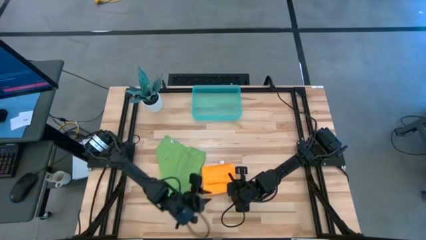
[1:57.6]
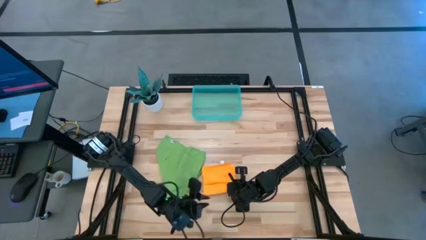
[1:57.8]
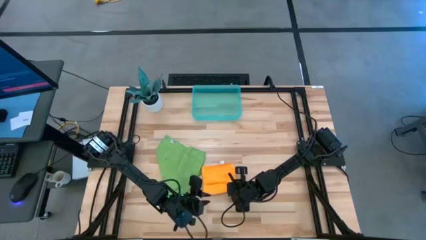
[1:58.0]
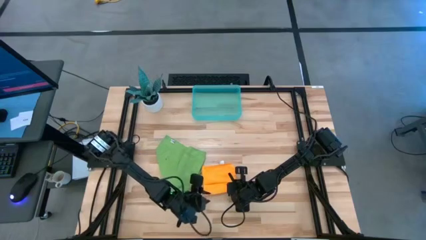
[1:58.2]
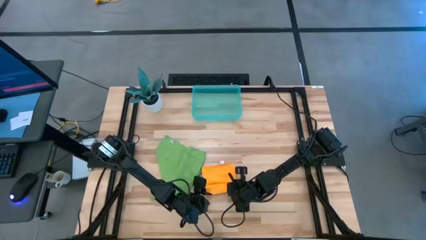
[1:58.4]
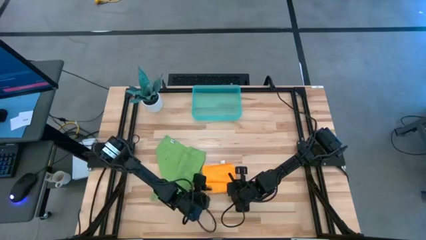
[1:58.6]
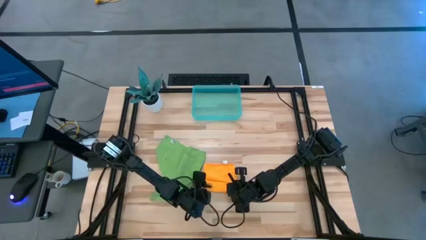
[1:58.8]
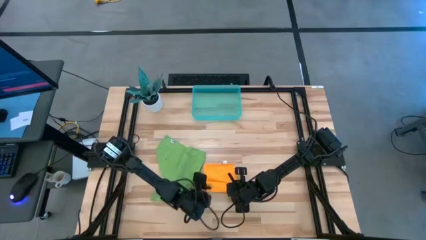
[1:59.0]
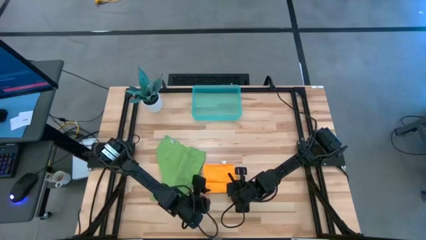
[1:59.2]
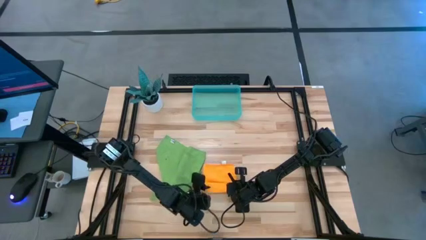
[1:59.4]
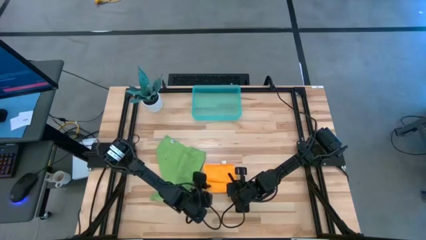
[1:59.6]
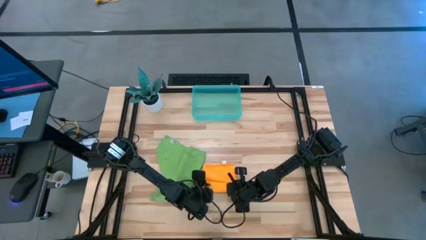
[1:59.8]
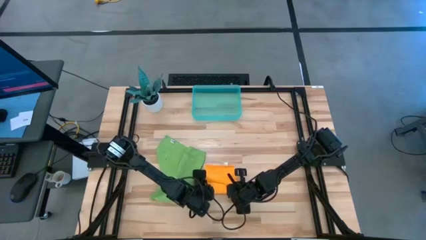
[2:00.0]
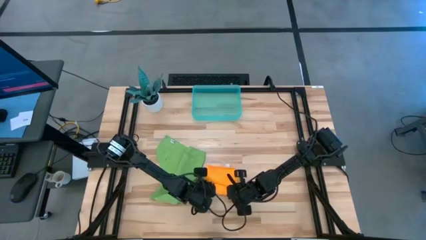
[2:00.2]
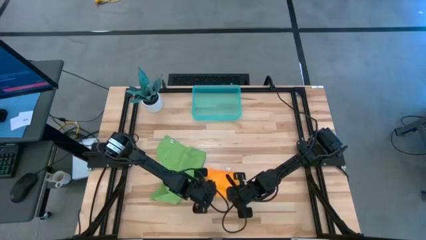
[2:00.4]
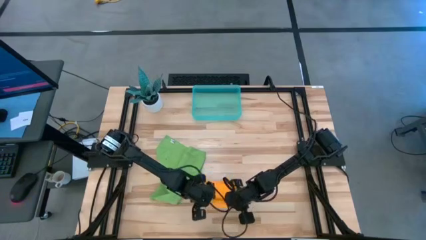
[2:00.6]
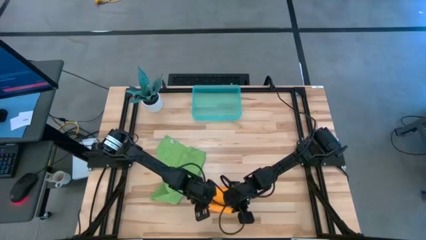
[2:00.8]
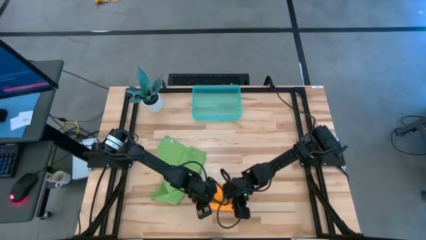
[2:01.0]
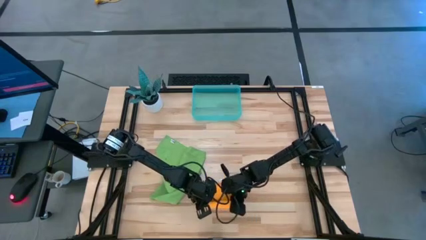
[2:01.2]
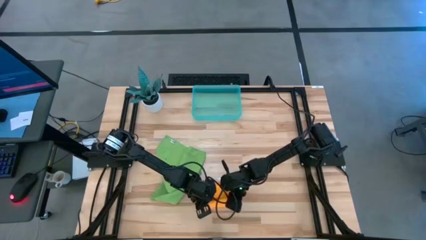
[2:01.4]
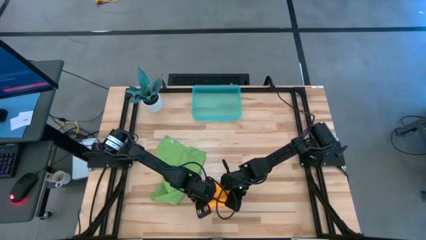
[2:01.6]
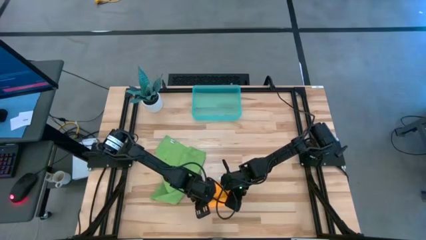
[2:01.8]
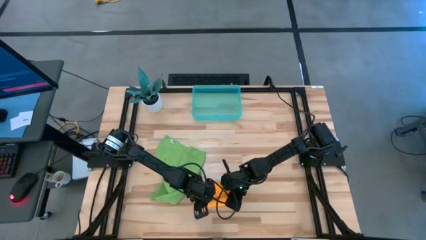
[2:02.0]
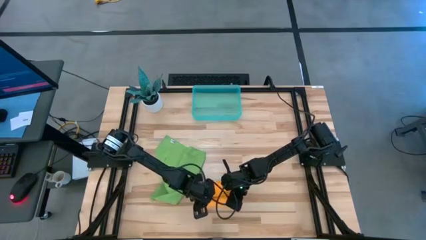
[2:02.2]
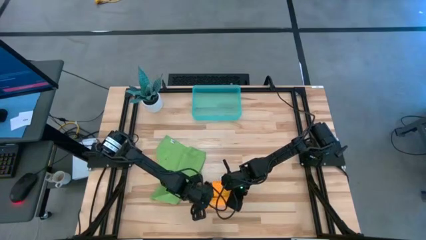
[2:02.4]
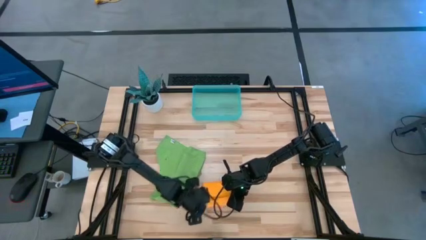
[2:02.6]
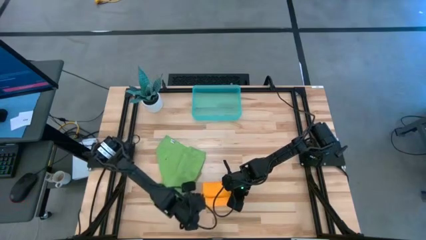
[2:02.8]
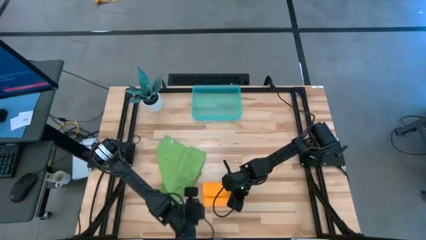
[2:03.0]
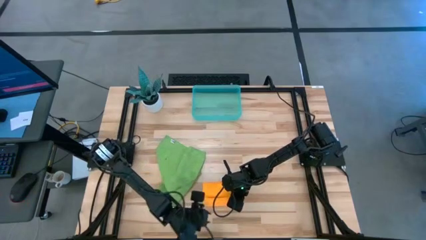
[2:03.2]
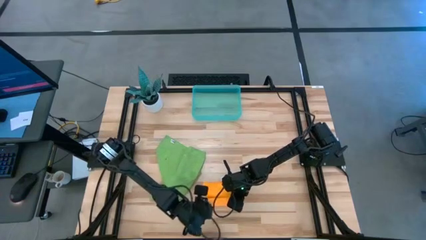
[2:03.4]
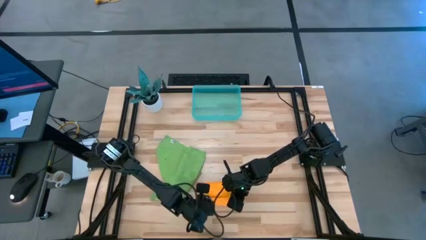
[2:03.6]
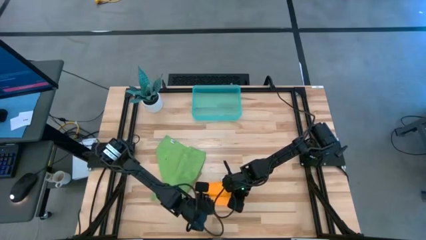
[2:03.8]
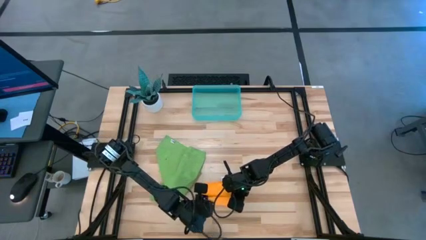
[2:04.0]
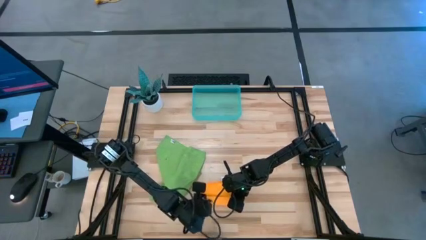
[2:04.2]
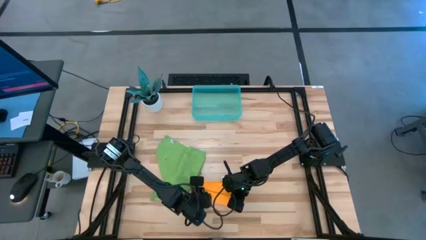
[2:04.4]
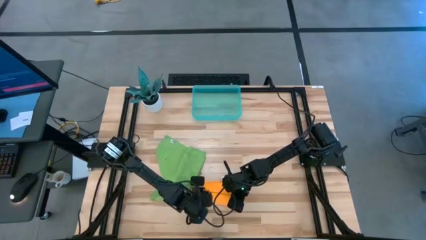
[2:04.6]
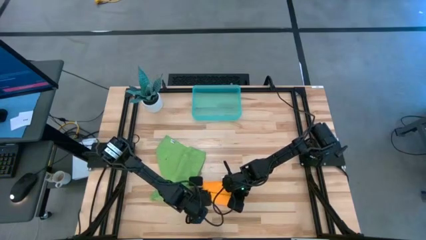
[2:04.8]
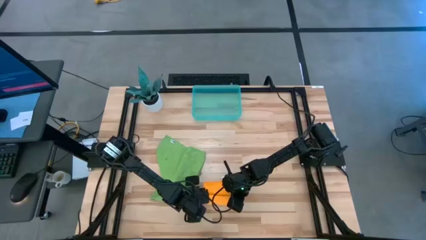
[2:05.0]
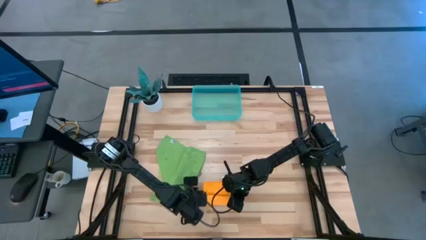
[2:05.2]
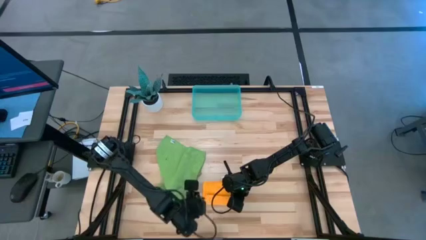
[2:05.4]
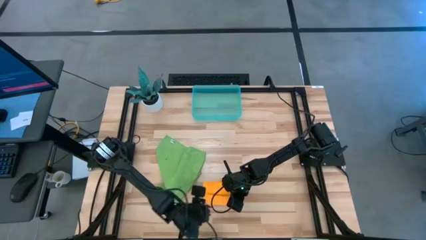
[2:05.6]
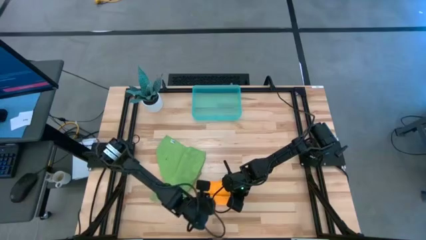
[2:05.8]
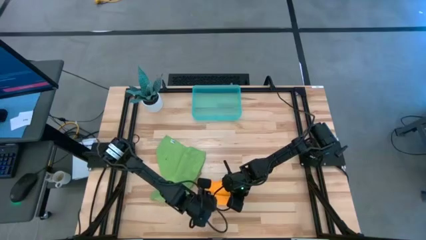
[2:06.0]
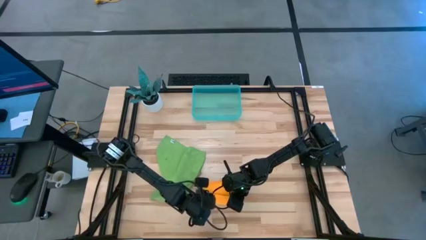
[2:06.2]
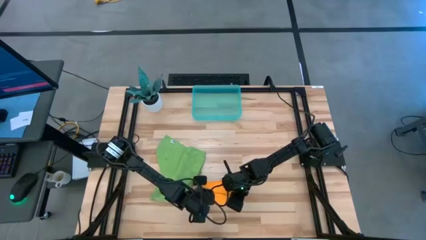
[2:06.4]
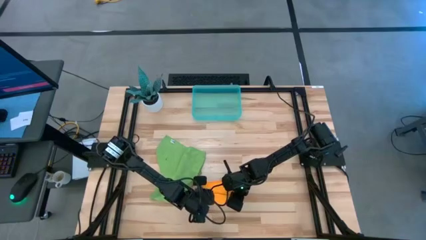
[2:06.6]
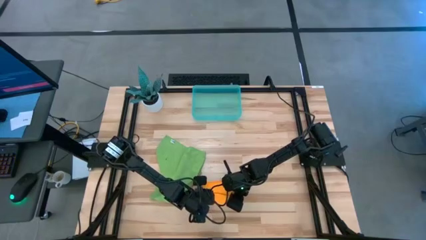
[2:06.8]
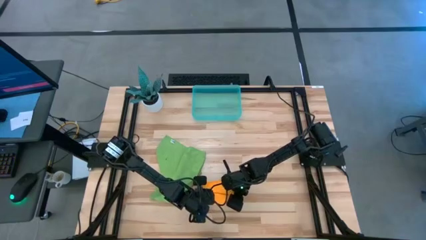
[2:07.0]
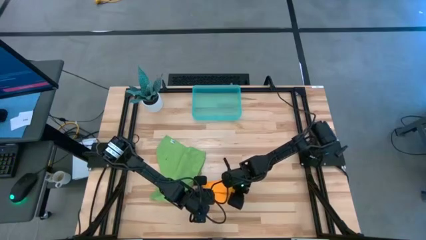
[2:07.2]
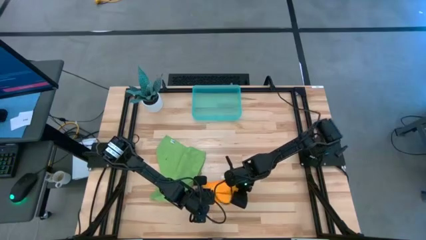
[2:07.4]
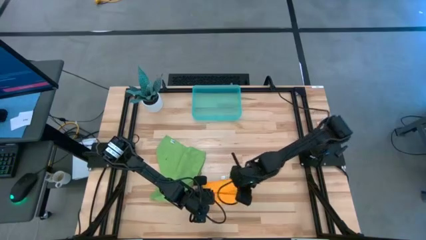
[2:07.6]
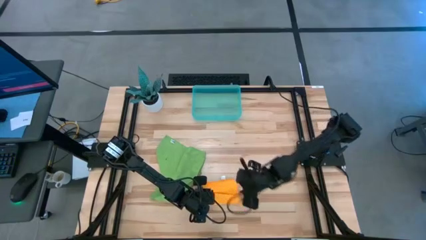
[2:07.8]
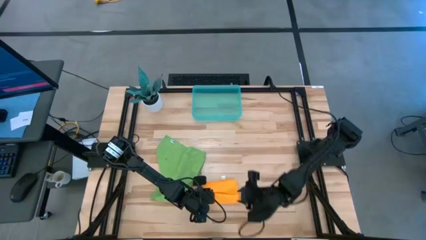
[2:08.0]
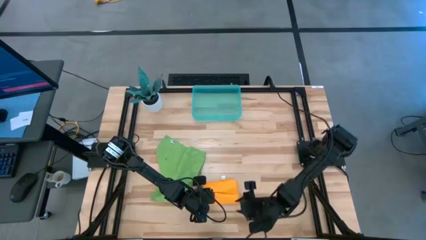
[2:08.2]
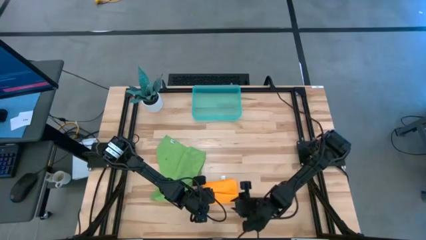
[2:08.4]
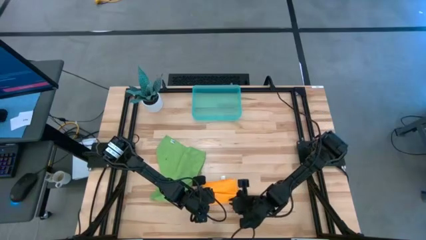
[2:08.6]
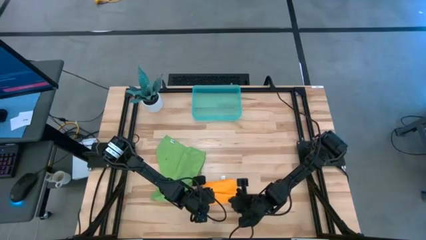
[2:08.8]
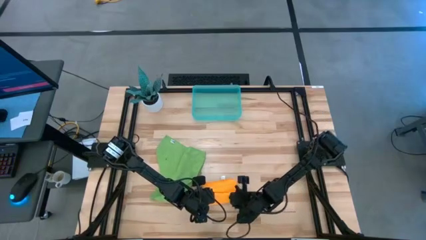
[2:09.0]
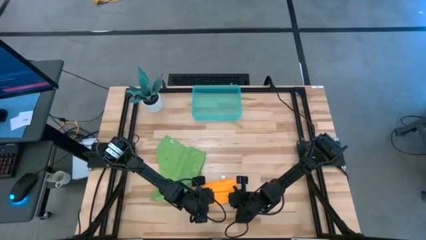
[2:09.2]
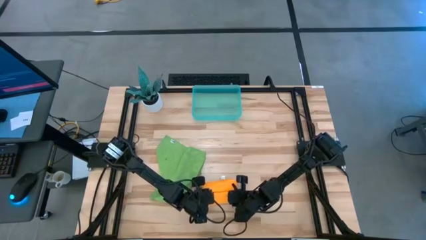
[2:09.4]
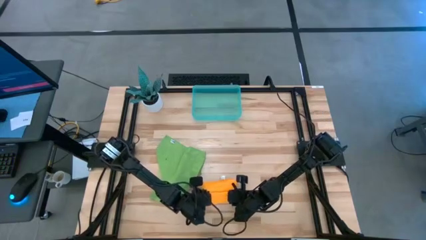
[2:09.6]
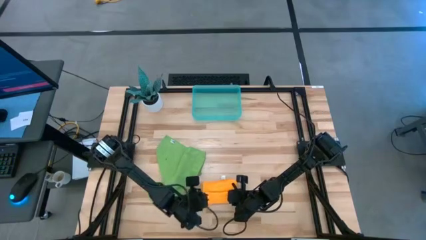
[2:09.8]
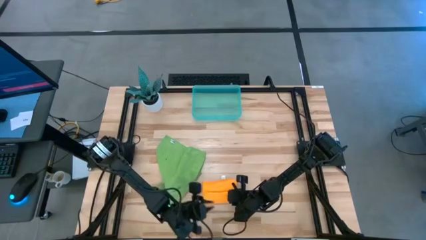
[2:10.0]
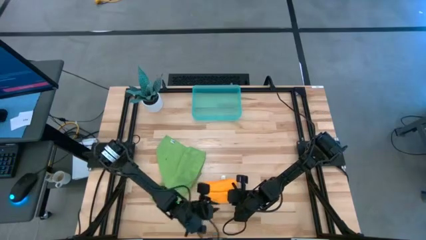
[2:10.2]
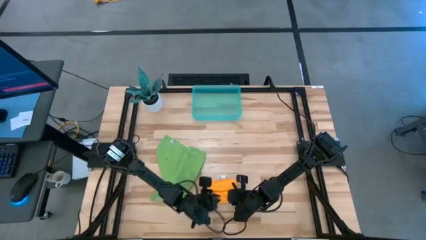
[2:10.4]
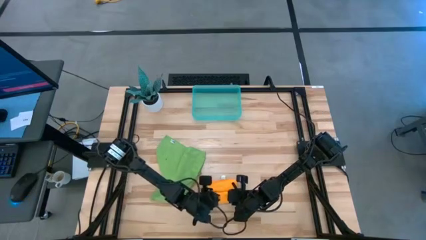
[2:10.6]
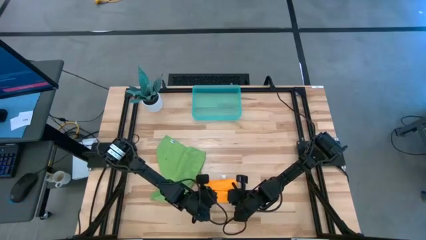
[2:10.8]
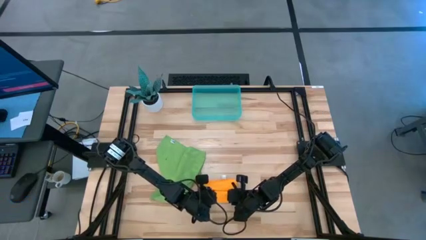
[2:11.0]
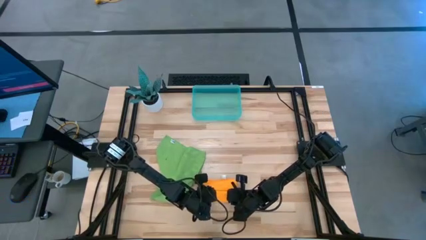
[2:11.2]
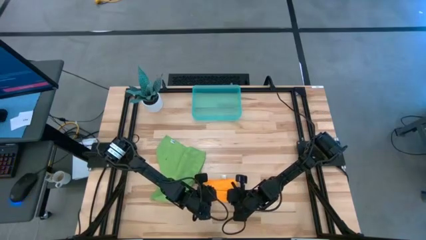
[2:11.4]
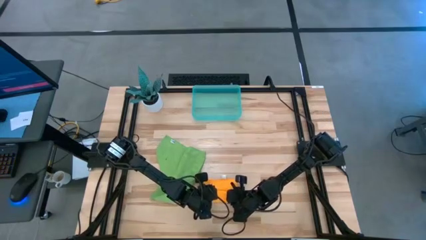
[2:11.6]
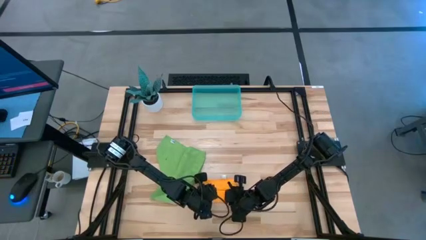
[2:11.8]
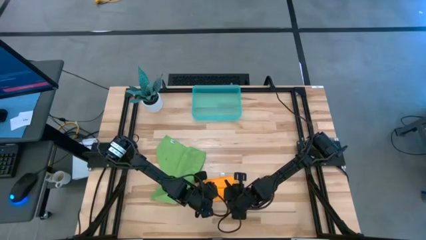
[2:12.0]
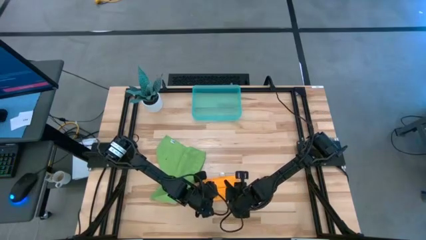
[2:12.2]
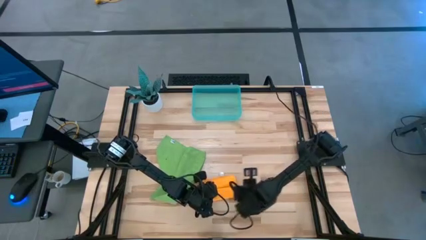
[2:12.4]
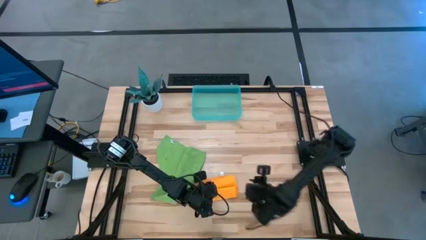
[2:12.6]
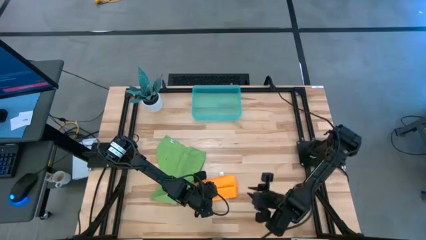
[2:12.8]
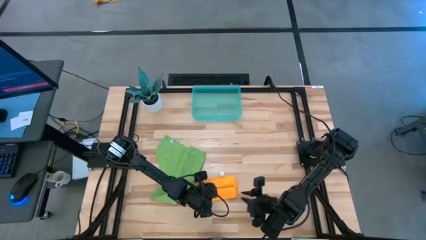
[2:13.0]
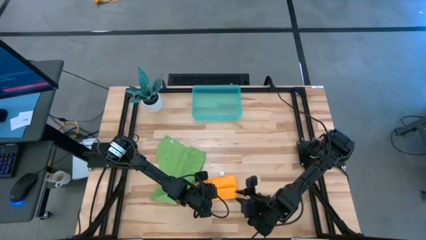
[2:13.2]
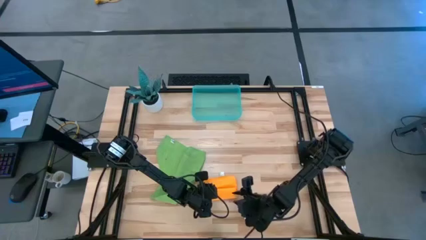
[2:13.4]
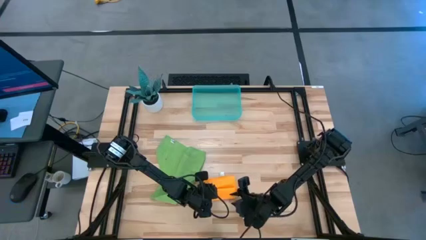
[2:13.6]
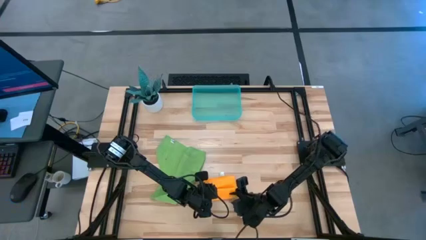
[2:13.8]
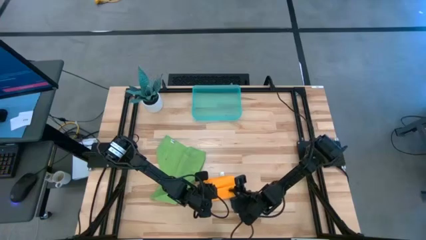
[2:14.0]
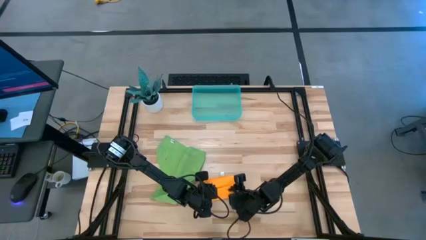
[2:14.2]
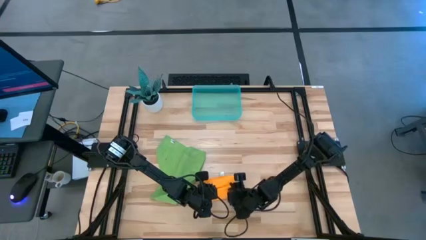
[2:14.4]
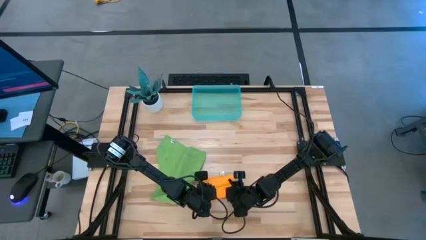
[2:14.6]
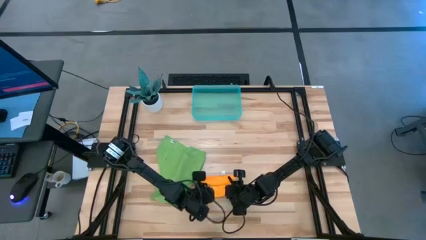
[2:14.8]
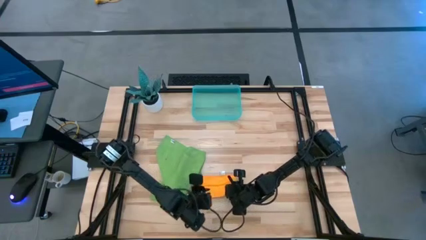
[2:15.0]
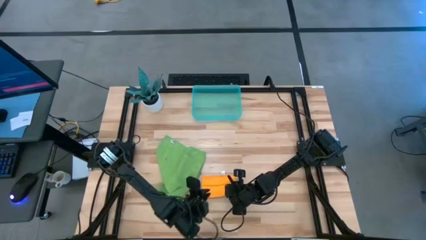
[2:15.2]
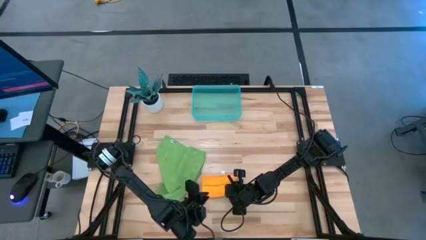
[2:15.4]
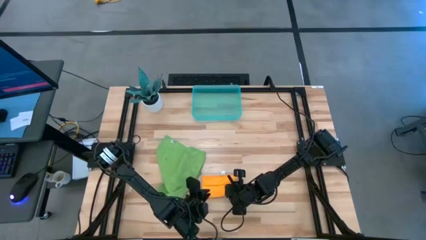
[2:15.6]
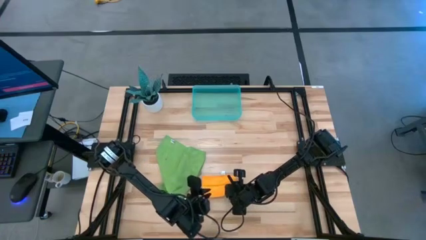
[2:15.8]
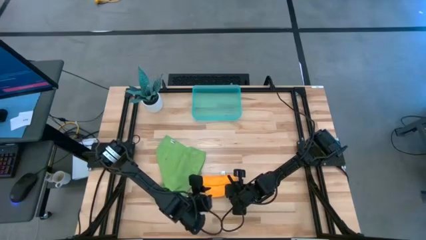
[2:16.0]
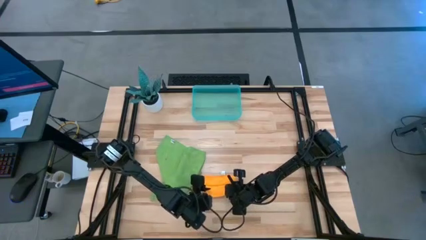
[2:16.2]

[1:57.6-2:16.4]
Task: Roll microfiber towels into tight, uniform cylinder then place into a basket
Roll the orange microfiber cloth
